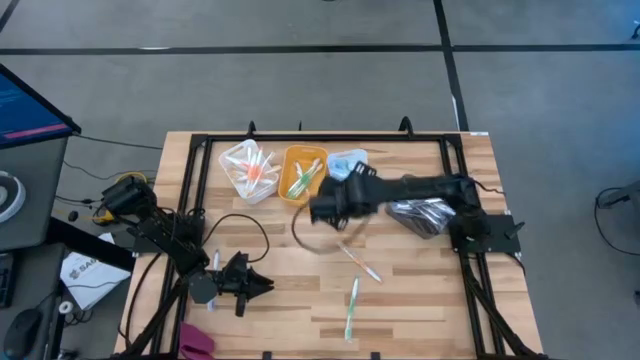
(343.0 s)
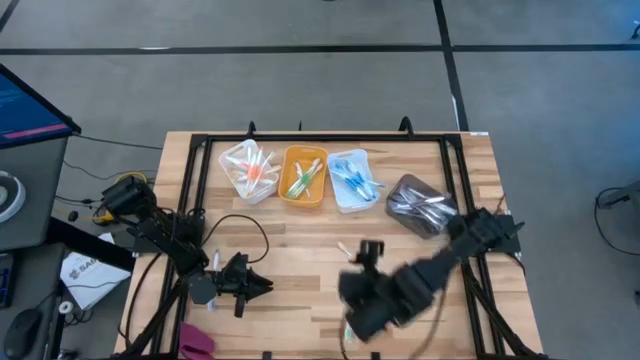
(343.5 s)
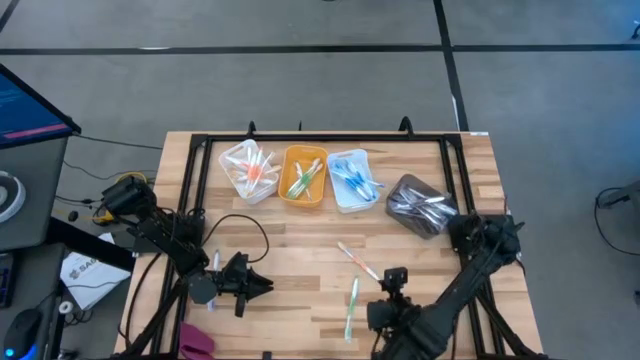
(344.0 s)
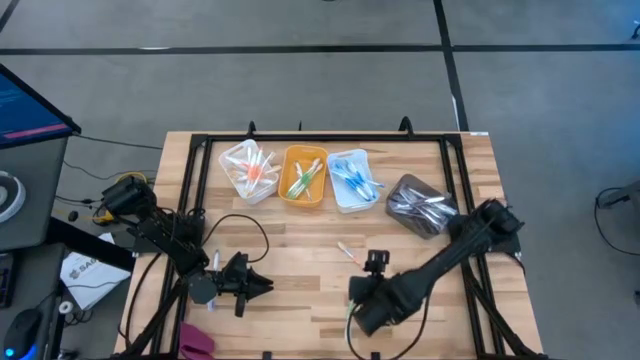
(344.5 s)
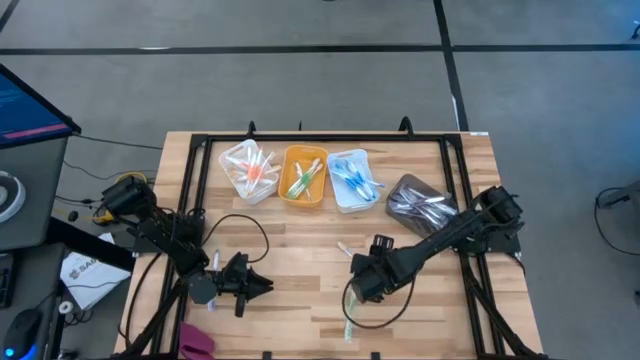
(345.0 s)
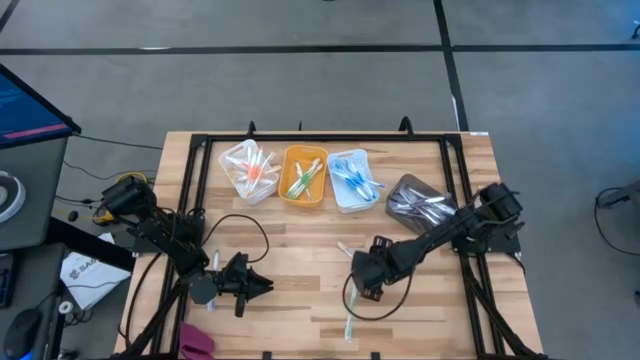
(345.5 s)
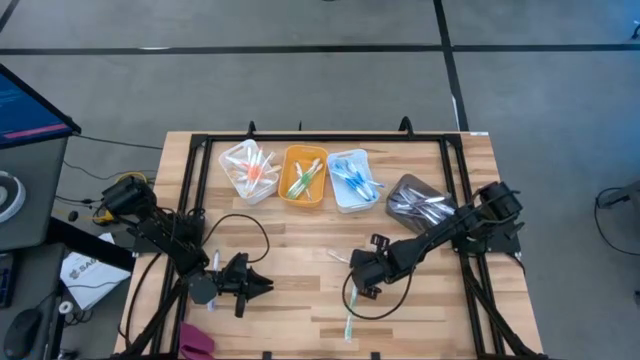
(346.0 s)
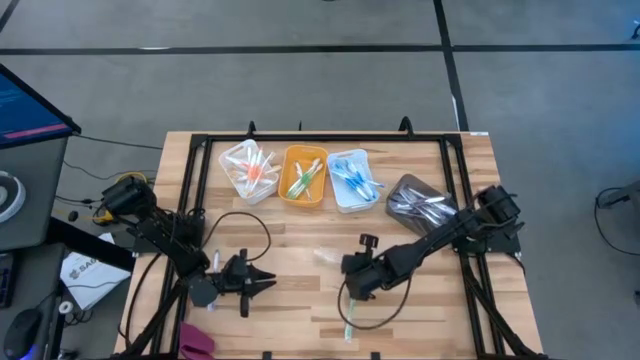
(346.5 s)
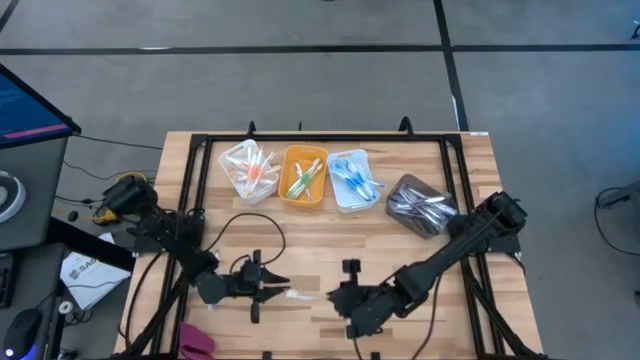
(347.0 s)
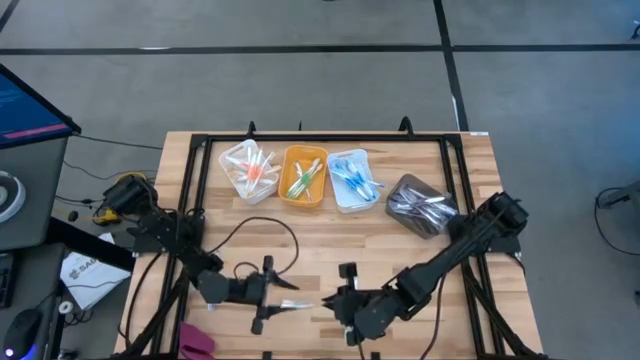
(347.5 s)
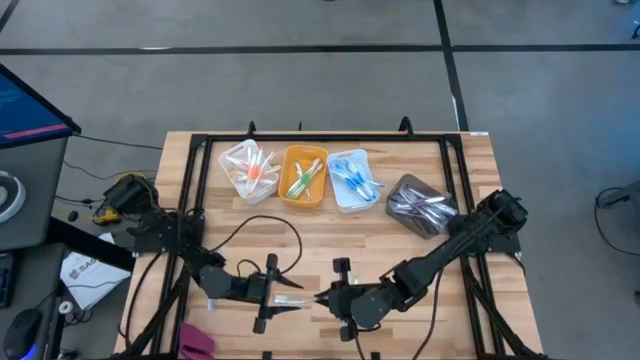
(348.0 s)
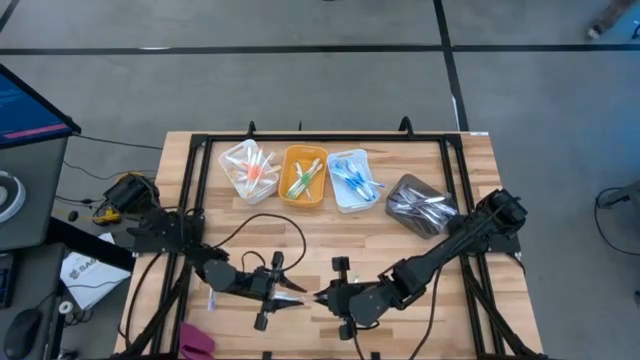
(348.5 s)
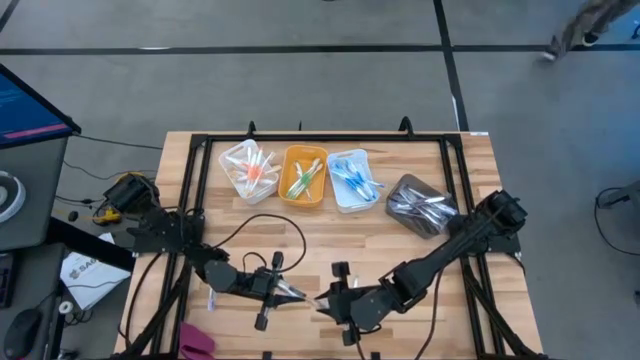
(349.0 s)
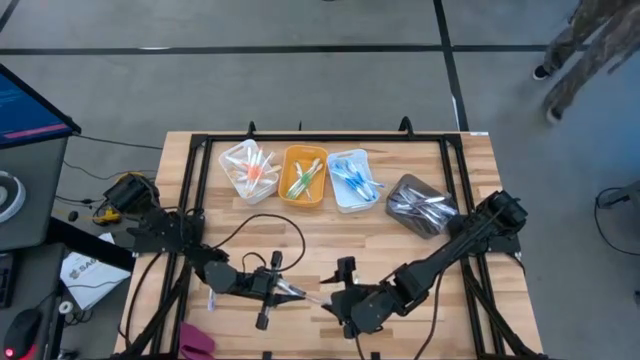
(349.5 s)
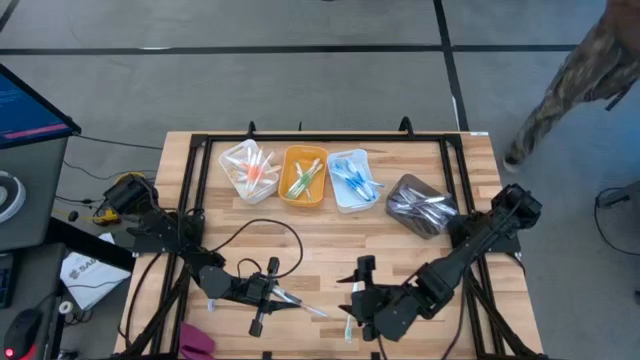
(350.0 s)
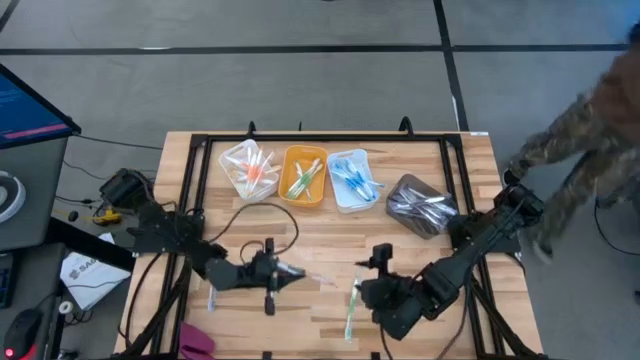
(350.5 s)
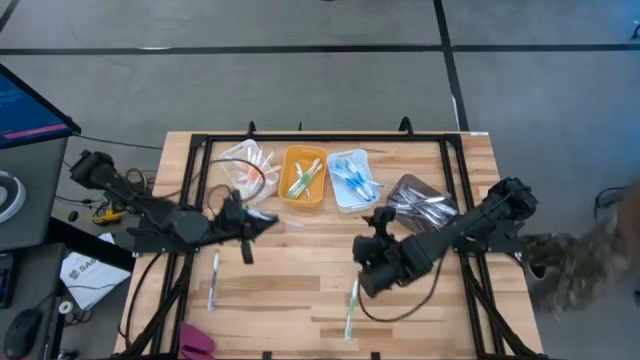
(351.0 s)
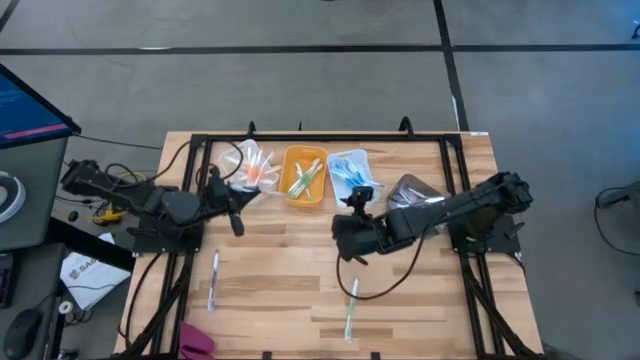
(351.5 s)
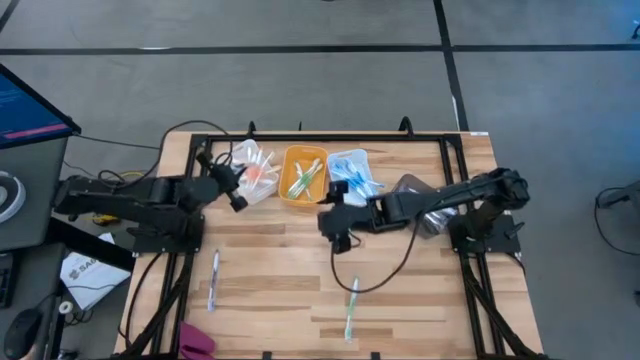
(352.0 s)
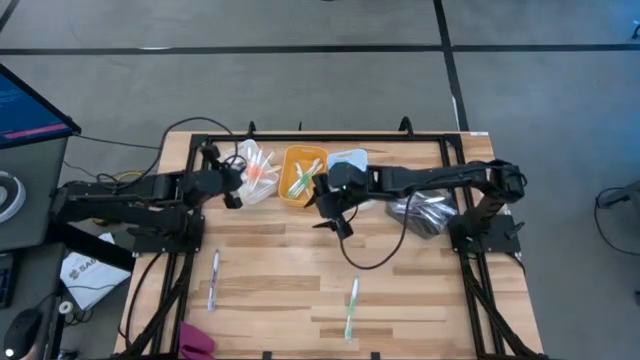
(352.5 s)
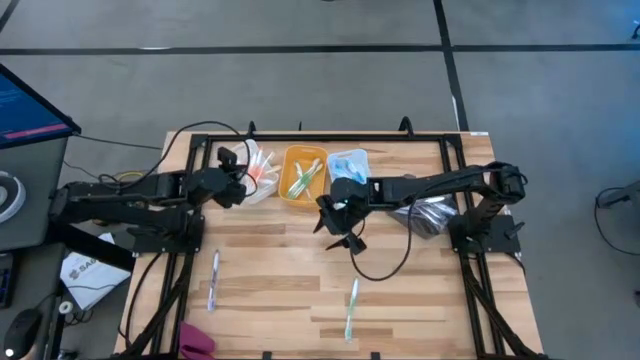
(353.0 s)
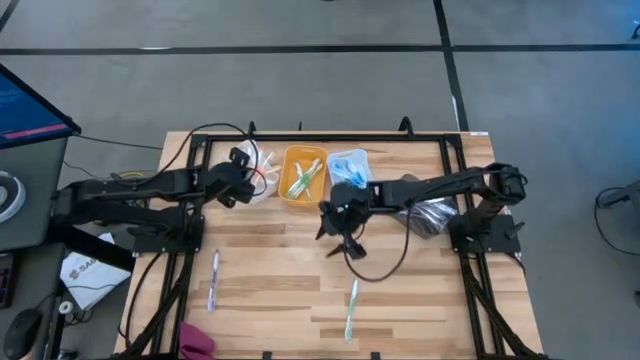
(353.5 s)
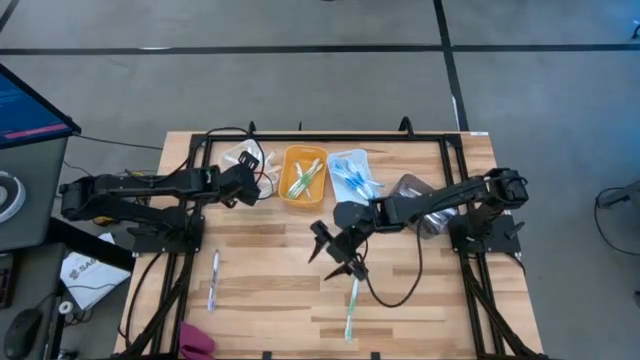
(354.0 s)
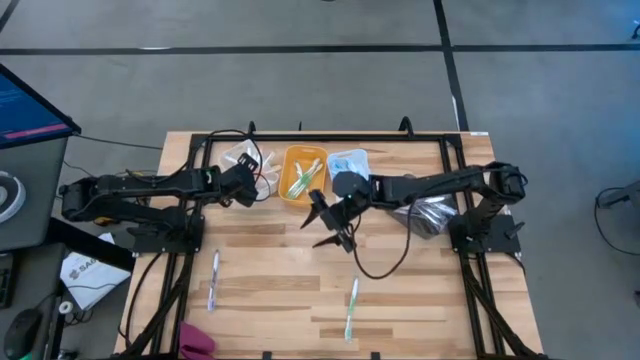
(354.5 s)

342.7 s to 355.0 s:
Task: Pick & Place Toothbrushes
Put the white orange toothbrush into the left white bin

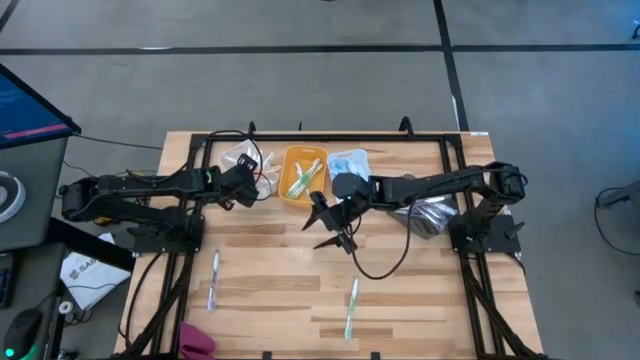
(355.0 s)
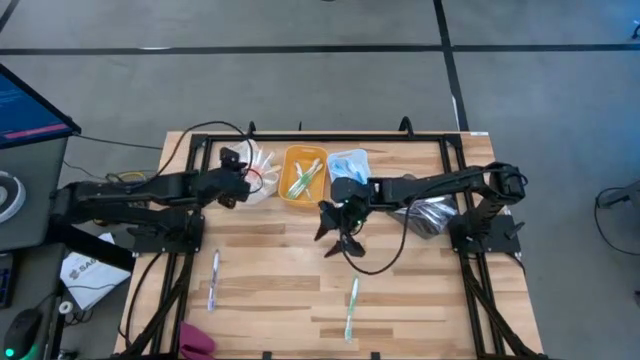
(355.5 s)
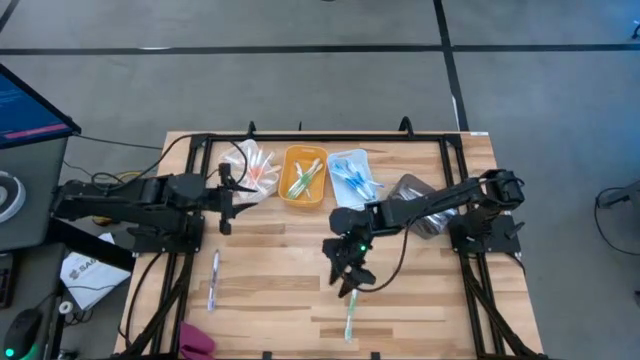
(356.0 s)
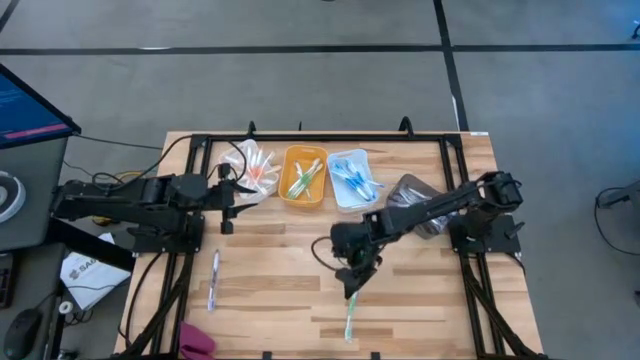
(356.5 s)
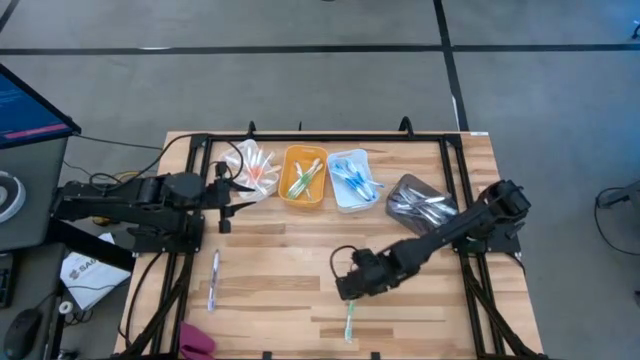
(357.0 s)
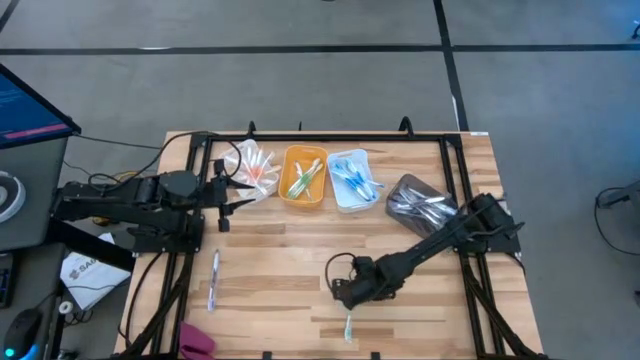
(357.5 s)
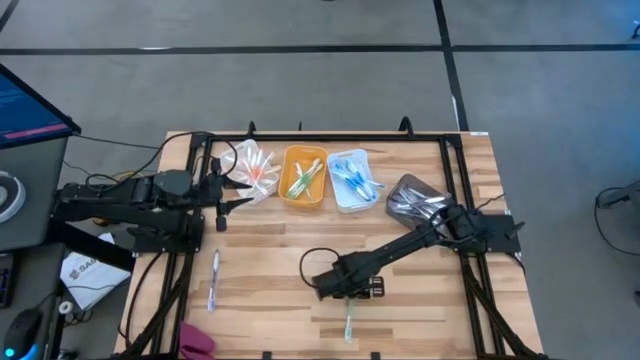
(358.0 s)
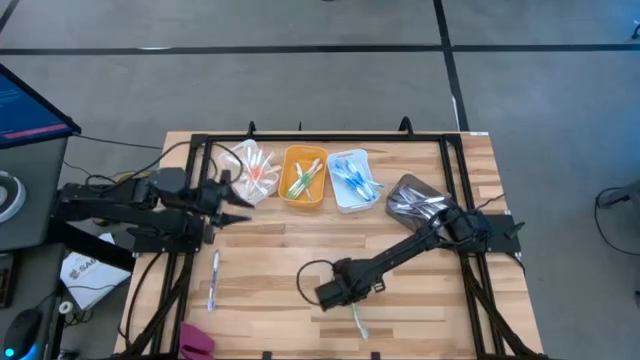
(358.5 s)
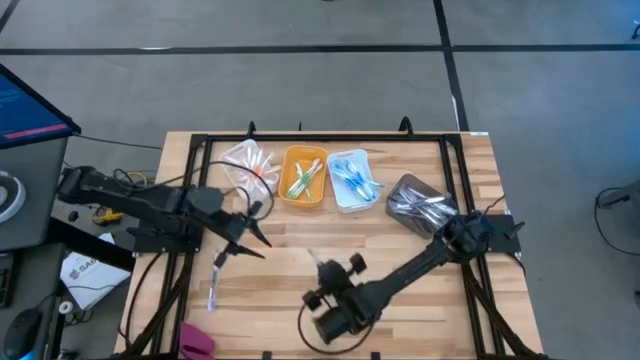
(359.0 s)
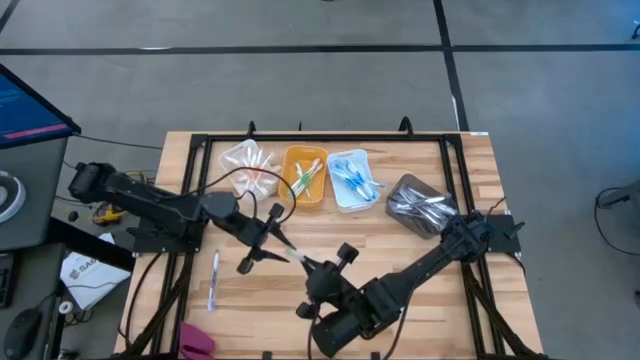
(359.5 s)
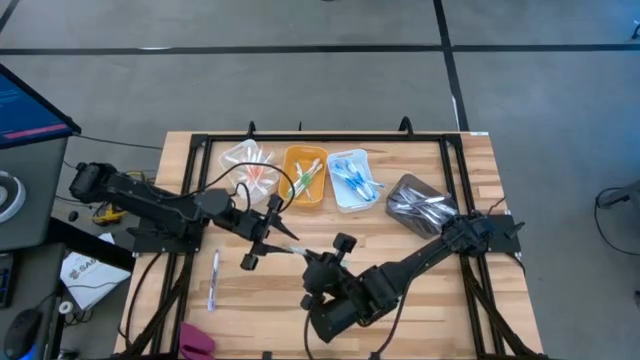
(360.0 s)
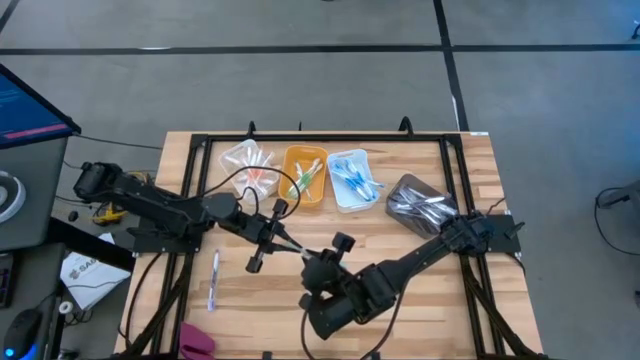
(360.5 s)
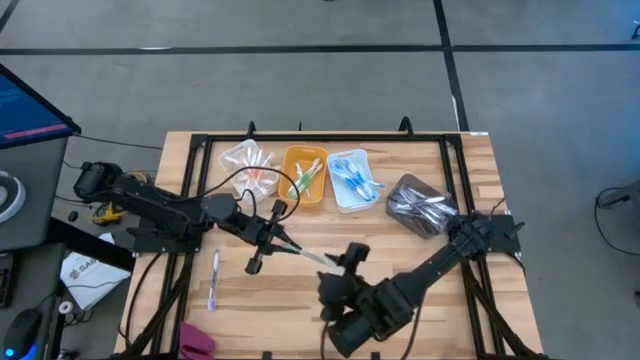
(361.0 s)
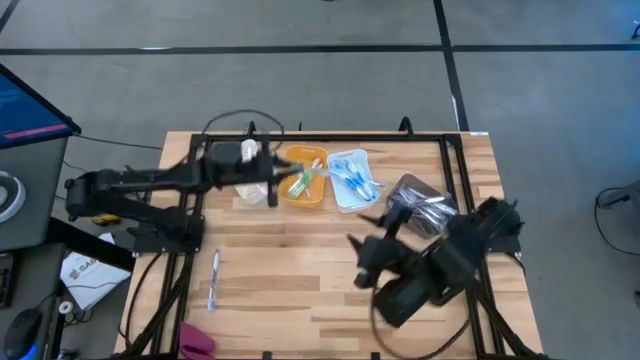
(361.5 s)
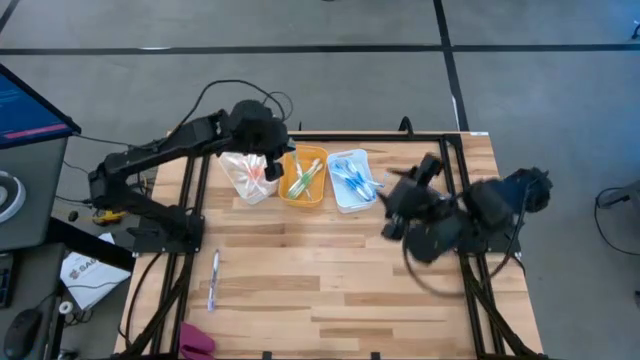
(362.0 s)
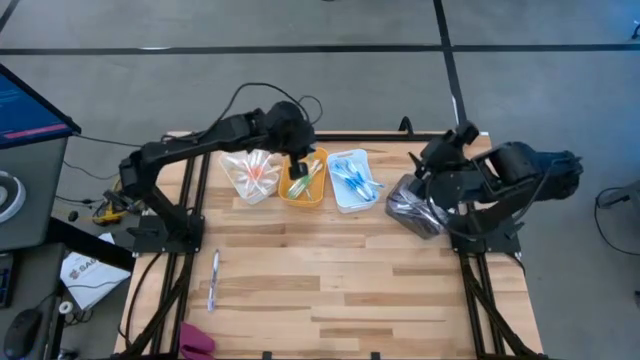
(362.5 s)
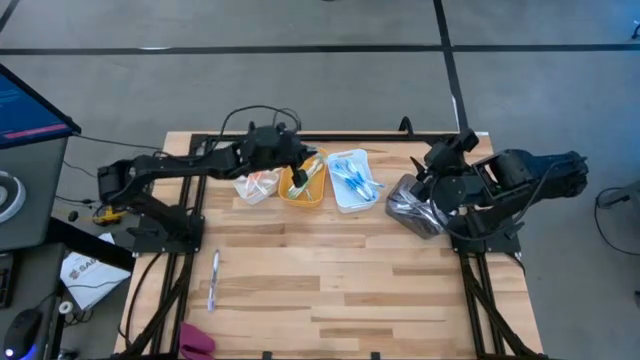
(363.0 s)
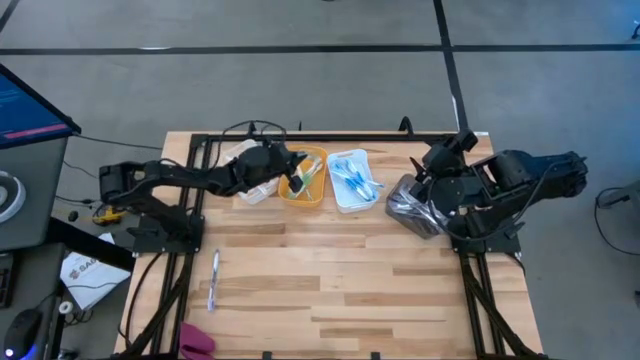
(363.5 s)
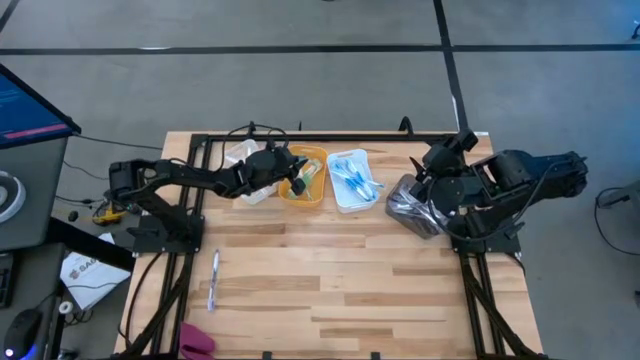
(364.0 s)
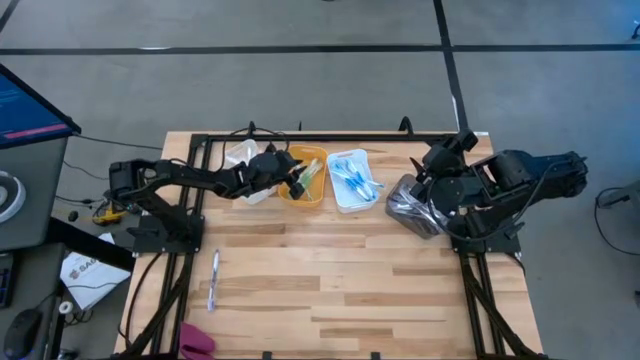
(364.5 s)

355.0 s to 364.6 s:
Put the white green toothbrush into the yellow bin
